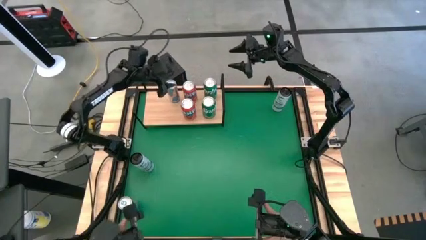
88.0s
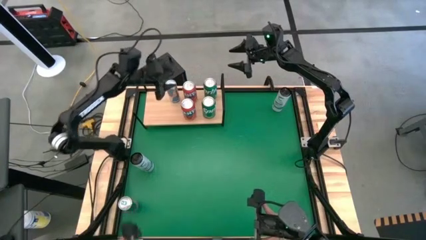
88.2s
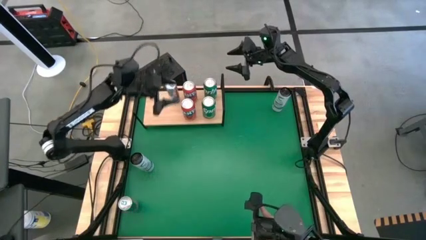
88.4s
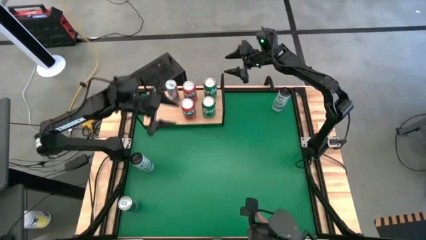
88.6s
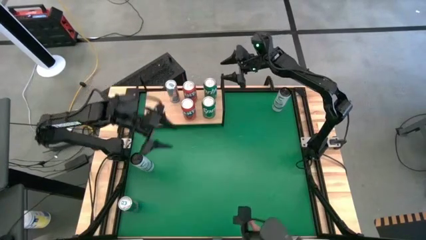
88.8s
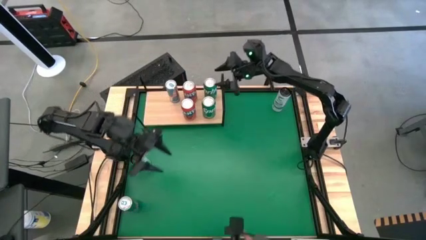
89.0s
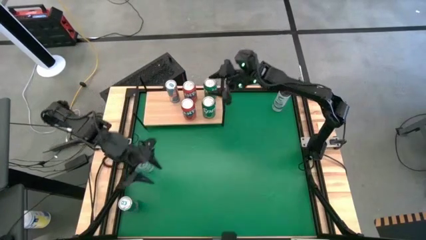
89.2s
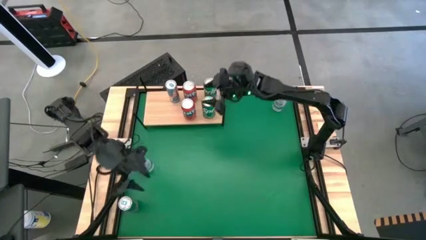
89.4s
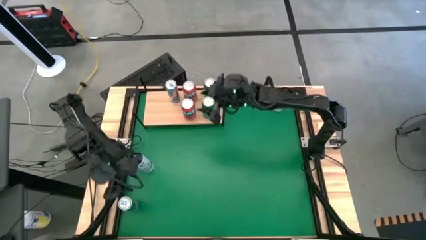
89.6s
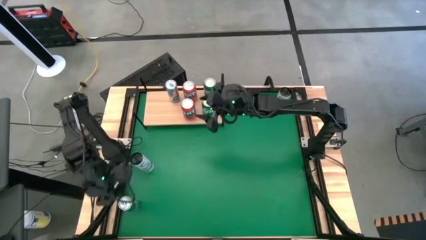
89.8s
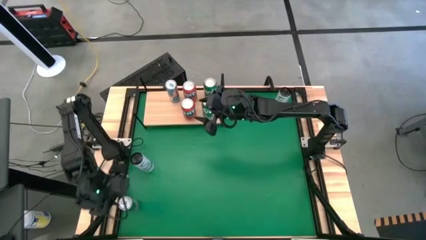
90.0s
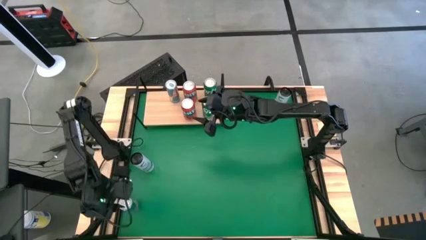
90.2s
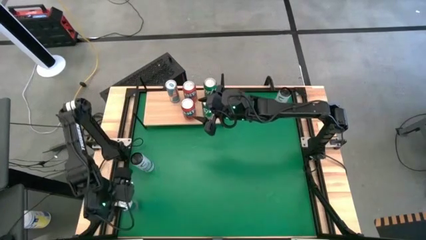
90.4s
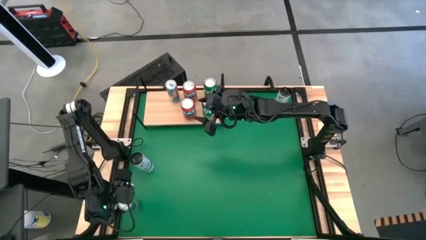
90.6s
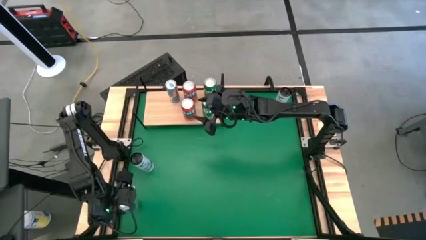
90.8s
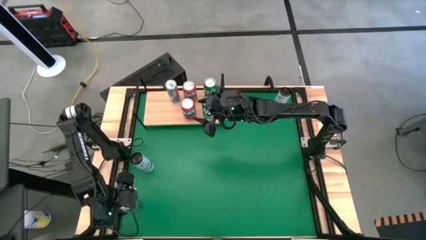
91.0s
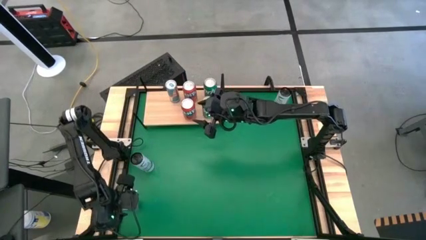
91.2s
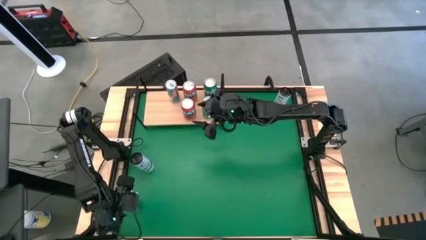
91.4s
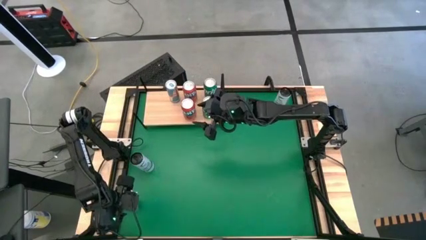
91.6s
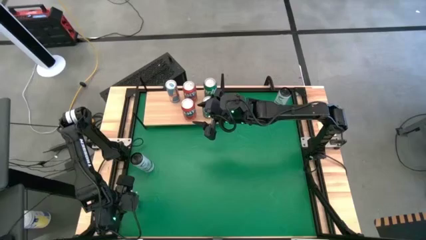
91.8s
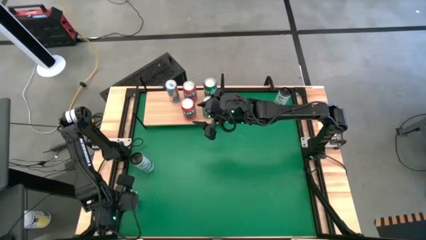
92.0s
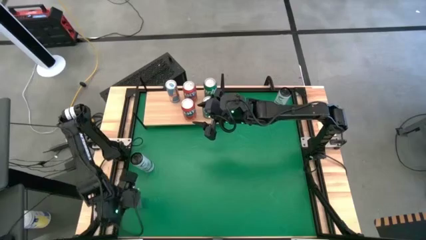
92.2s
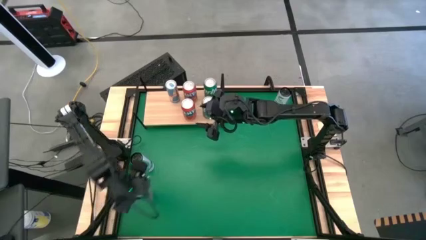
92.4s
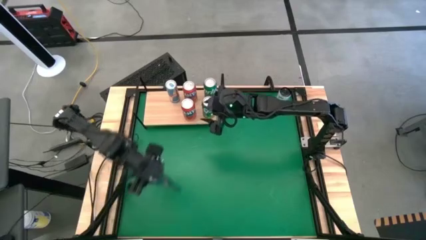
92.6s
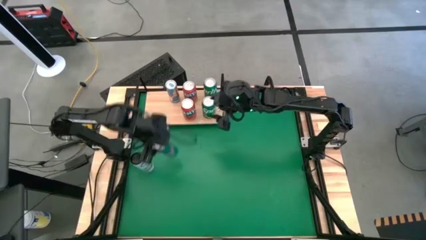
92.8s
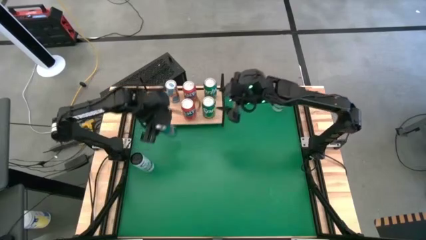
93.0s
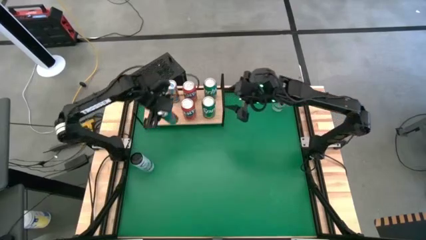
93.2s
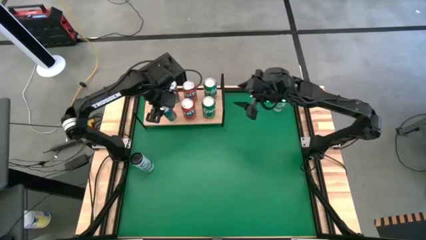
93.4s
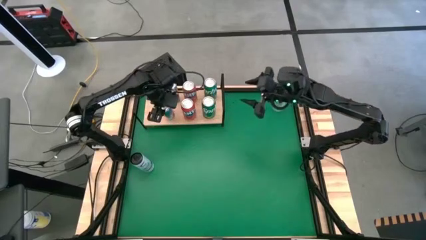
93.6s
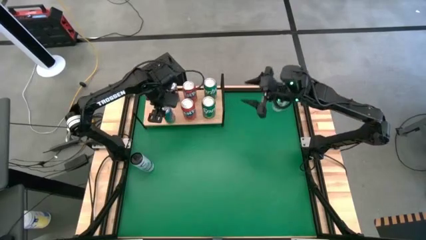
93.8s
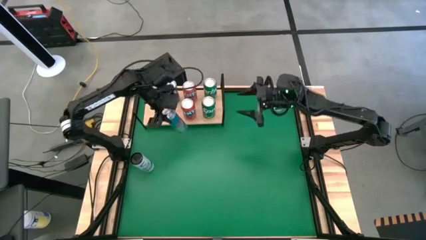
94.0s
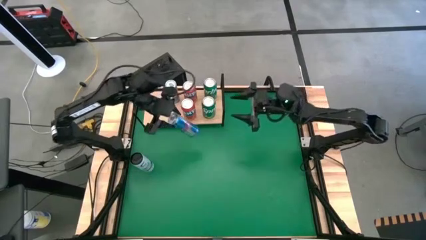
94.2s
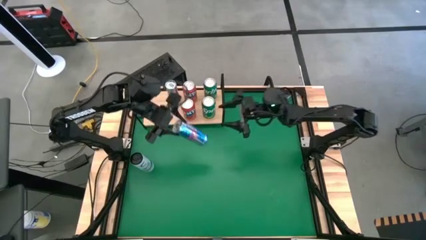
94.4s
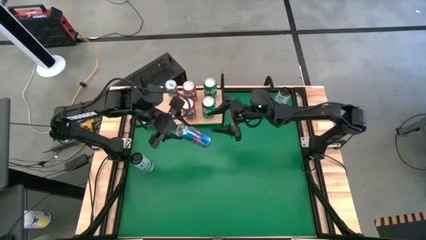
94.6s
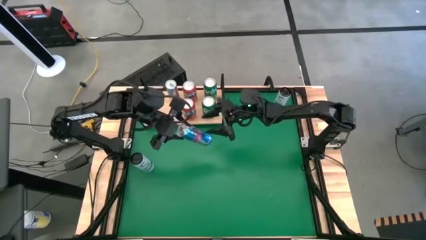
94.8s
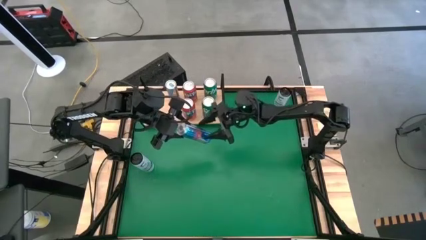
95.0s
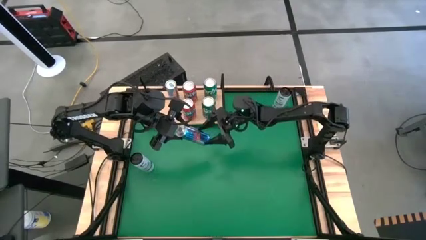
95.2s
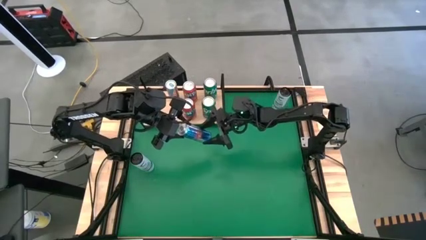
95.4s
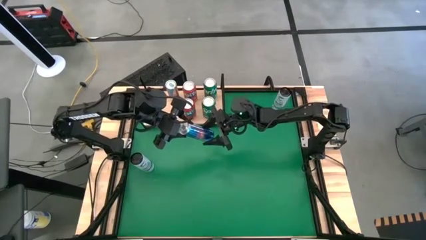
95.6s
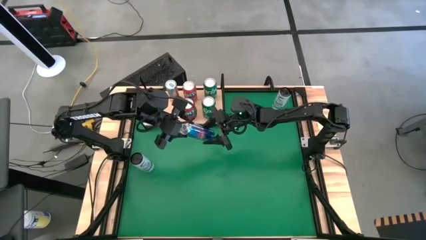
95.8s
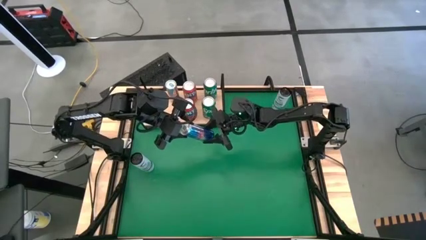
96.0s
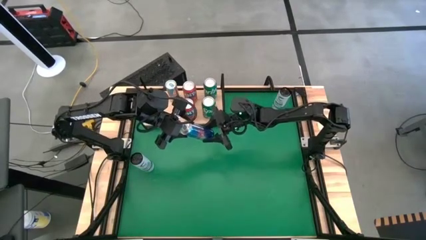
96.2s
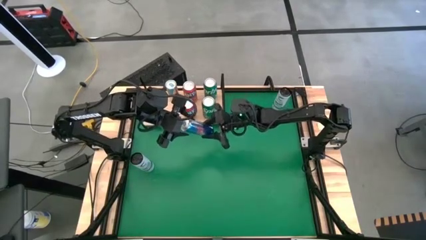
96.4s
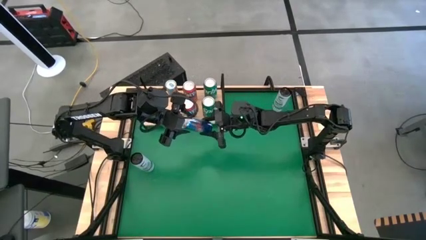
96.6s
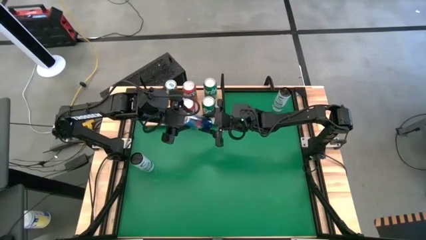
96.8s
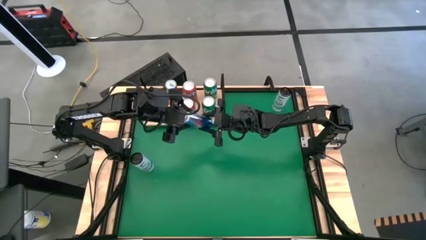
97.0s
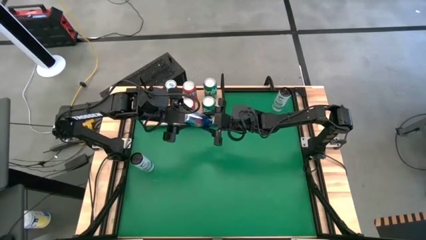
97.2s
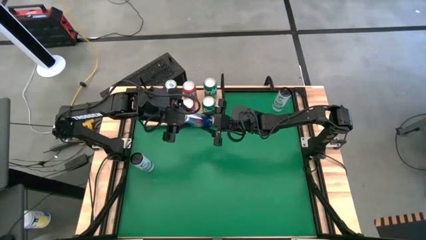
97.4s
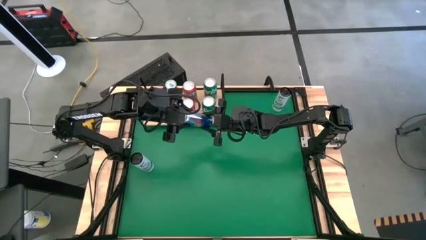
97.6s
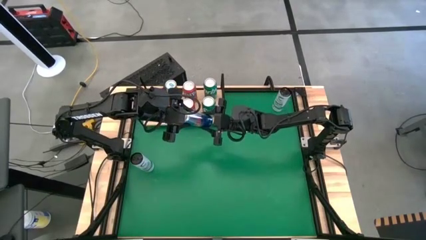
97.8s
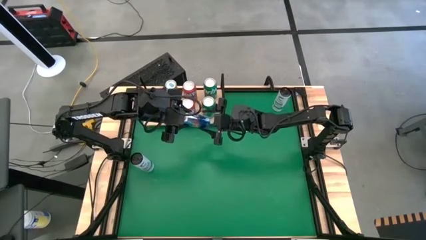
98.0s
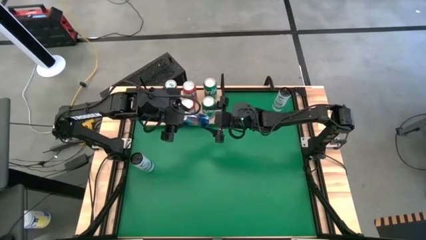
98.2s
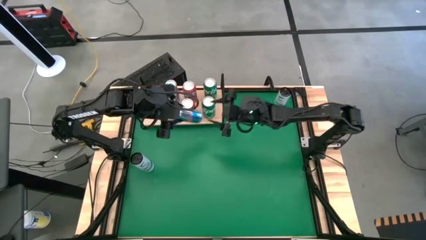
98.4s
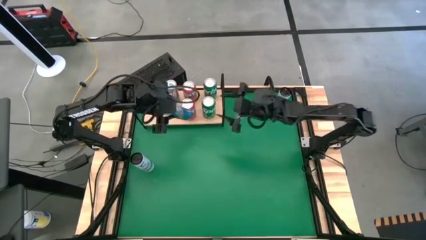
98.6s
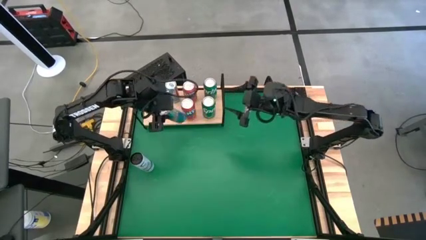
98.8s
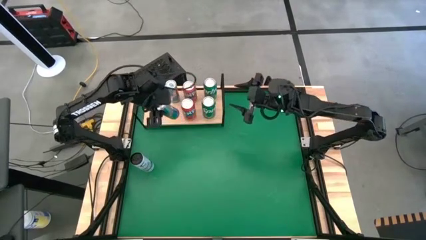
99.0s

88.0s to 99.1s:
Task: Place canned beverage on shelf
Put the blue soda can aligned with the other blue soda can on the shelf

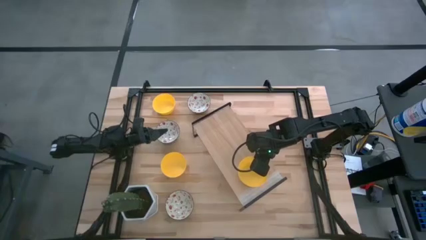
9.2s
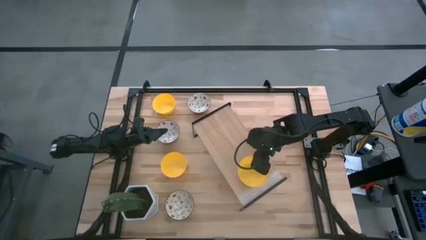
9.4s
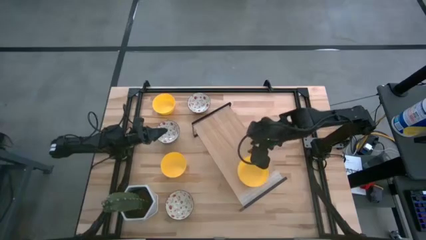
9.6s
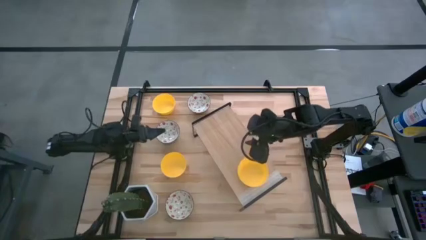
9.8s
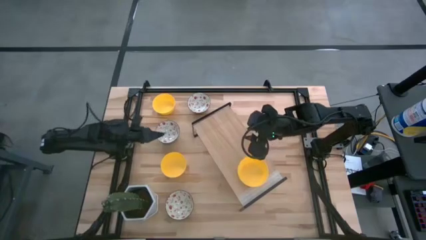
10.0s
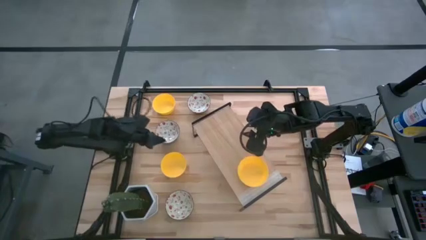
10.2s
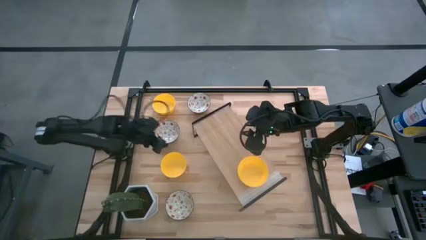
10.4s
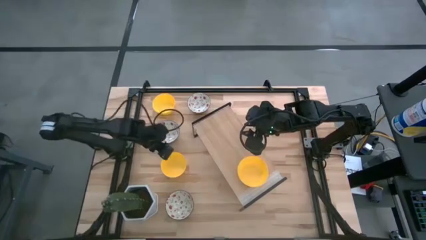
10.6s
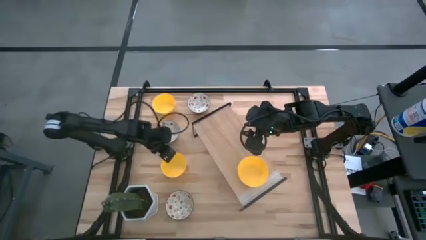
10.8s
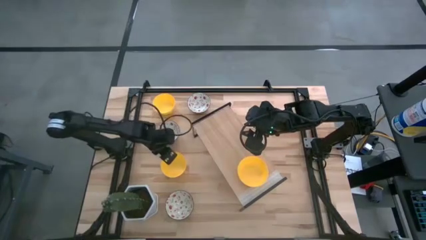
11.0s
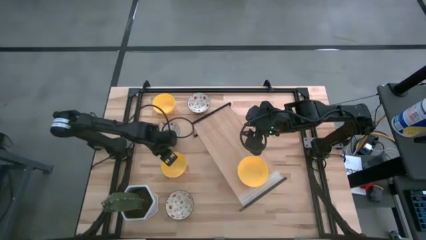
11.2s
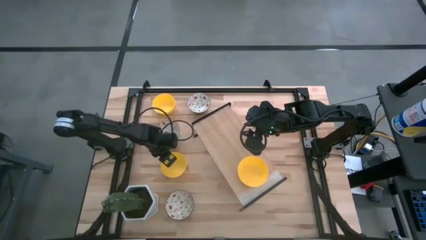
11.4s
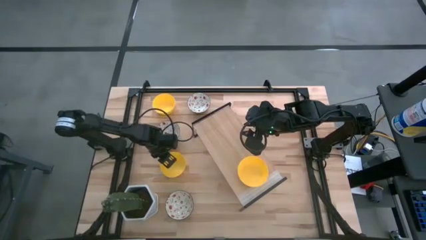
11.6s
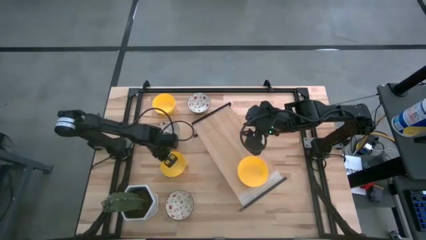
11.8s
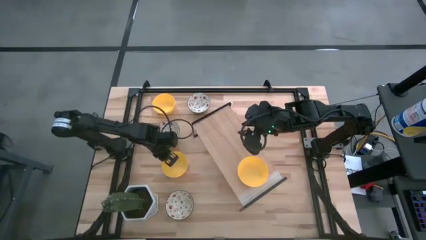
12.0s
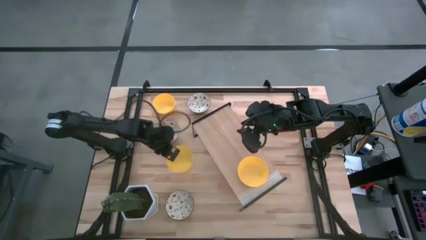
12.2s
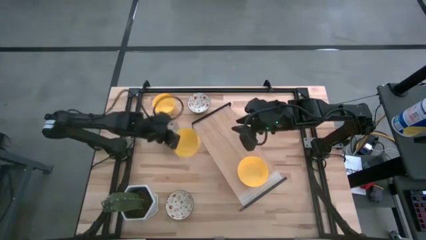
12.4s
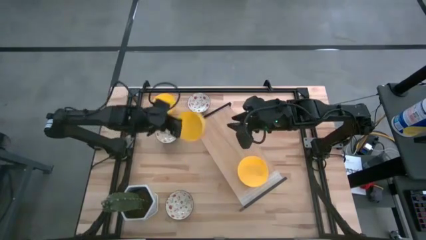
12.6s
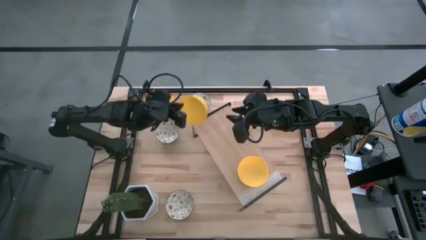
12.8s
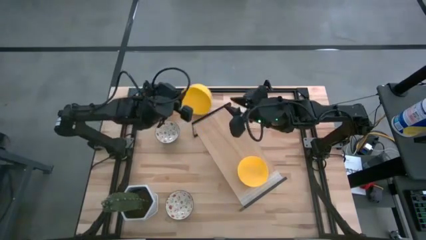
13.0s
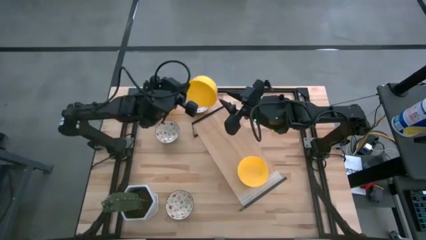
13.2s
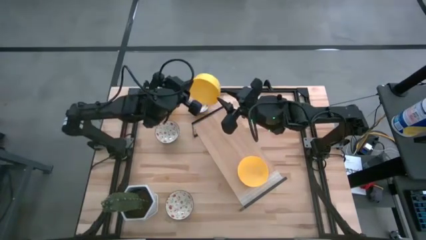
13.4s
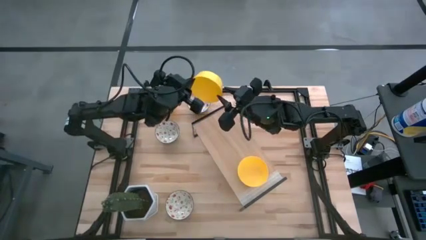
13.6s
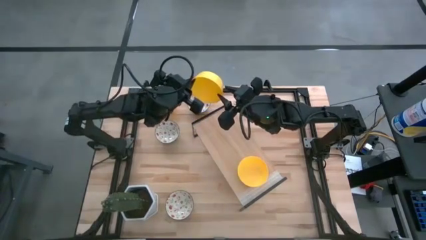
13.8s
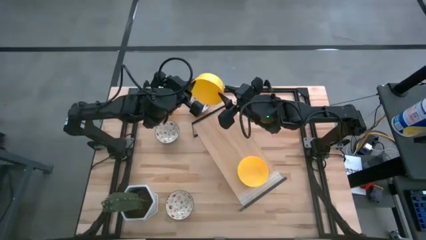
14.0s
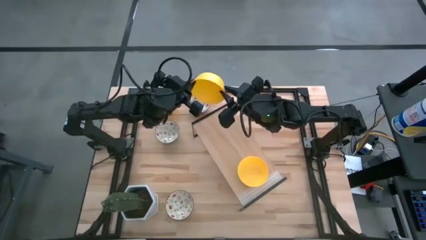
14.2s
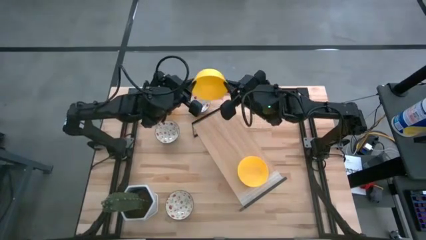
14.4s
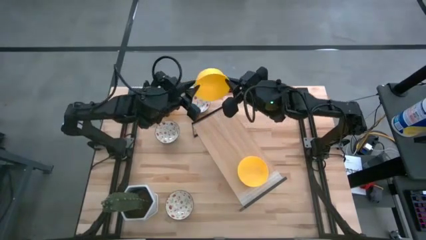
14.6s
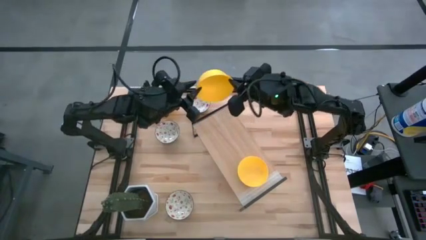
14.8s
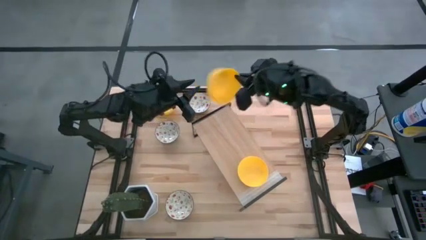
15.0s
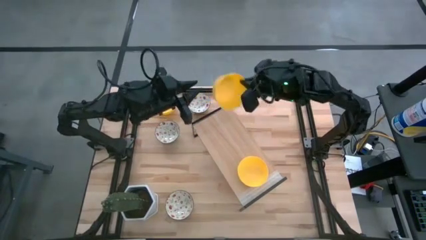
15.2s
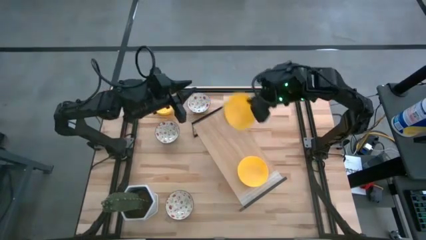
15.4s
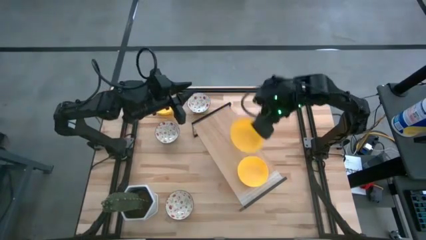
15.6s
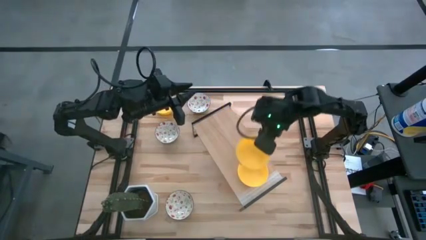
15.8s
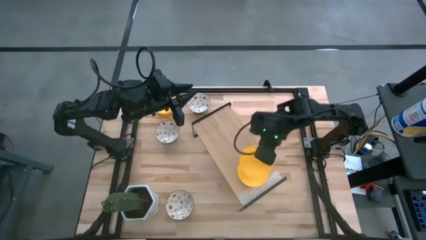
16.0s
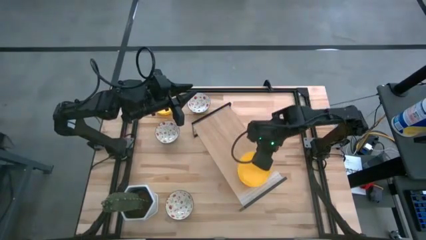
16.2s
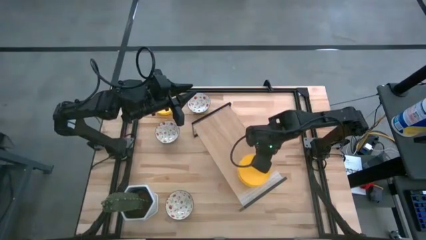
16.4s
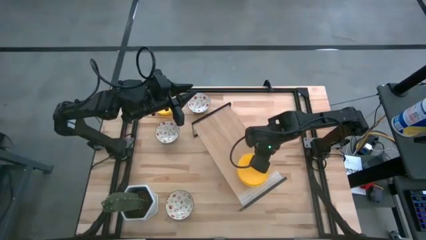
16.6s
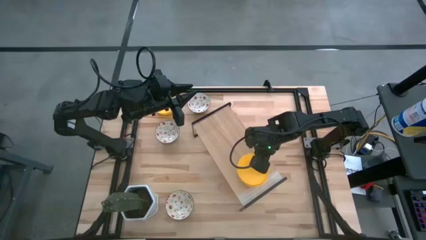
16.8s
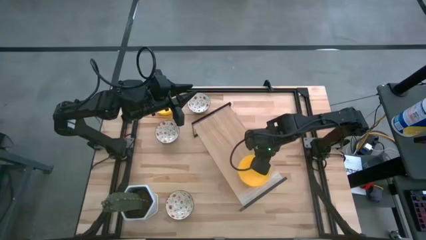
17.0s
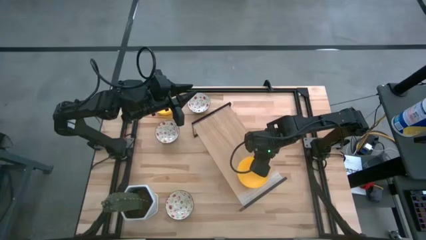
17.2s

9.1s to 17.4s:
Task: Pick & Place Mini bowls
Stack the bottom yellow bowl on the yellow bowl on the shelf
